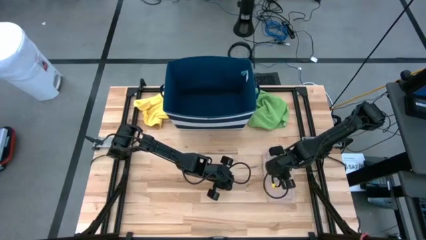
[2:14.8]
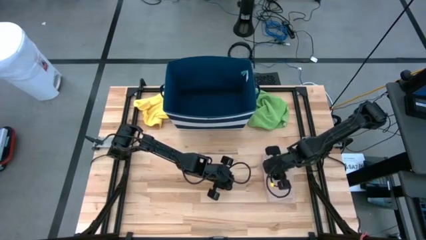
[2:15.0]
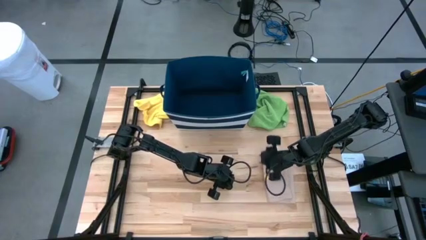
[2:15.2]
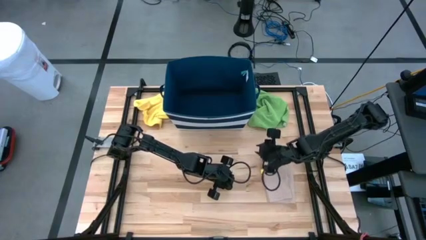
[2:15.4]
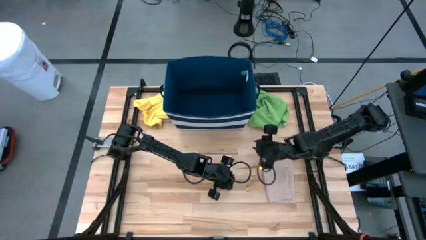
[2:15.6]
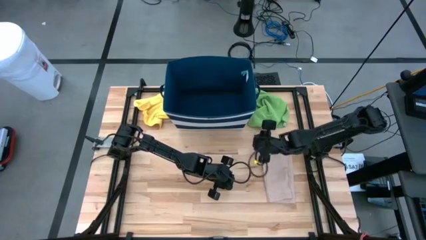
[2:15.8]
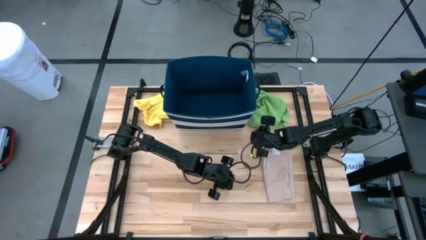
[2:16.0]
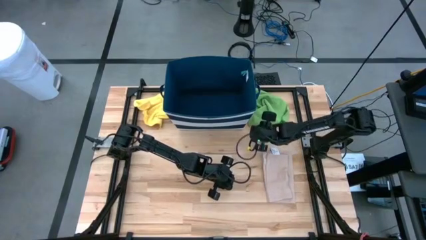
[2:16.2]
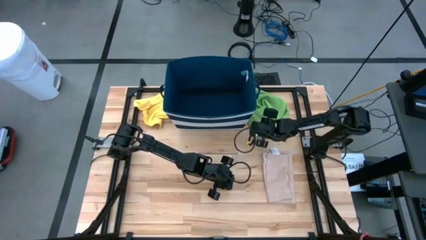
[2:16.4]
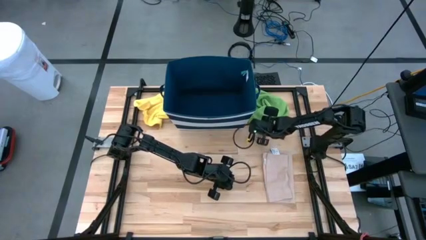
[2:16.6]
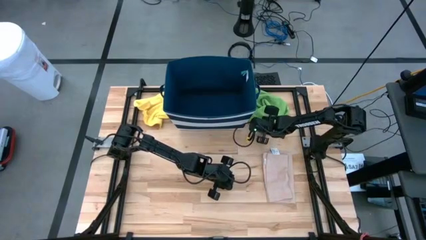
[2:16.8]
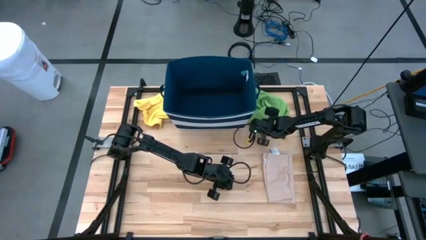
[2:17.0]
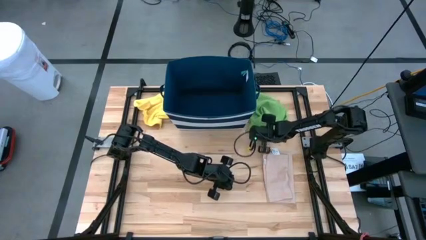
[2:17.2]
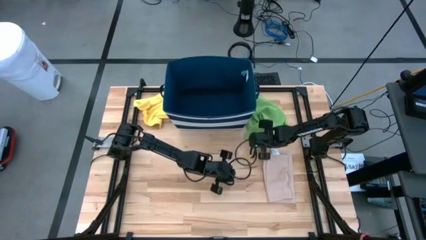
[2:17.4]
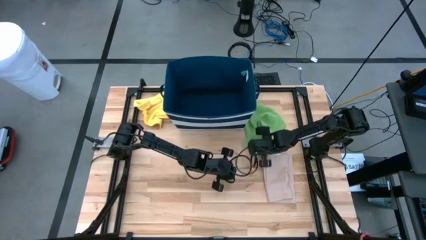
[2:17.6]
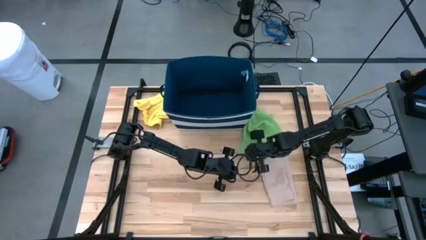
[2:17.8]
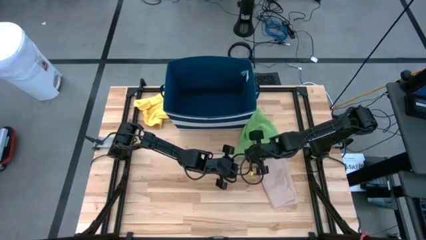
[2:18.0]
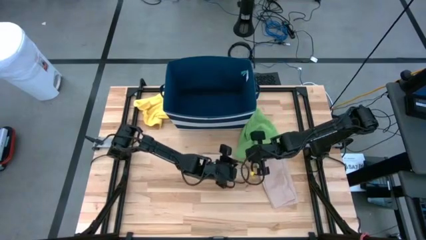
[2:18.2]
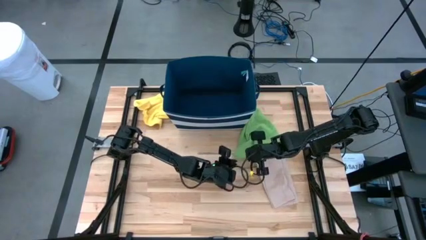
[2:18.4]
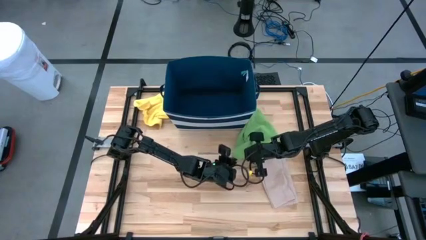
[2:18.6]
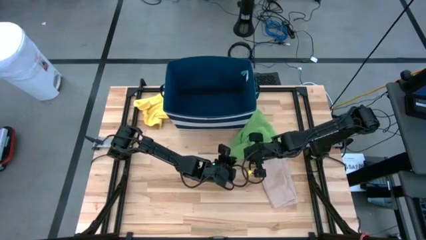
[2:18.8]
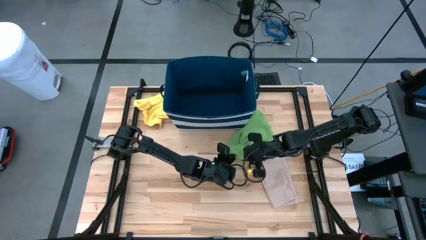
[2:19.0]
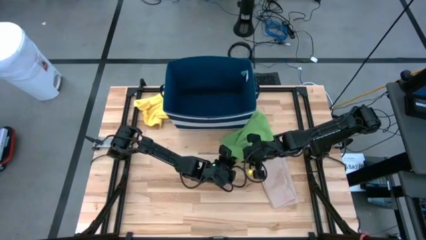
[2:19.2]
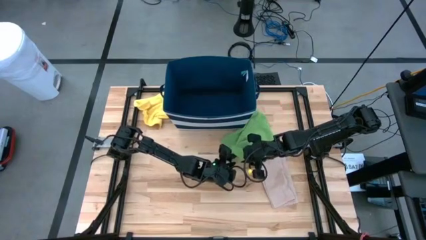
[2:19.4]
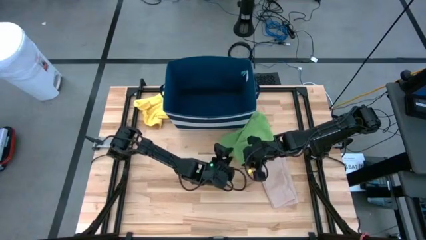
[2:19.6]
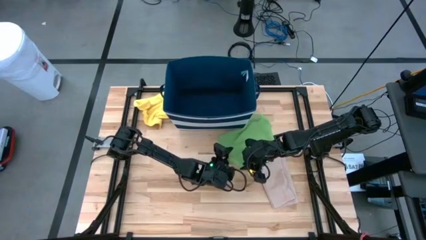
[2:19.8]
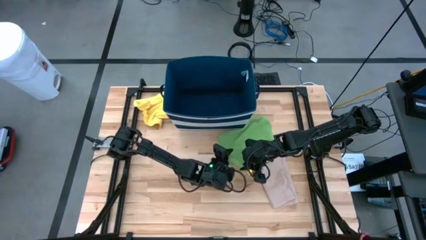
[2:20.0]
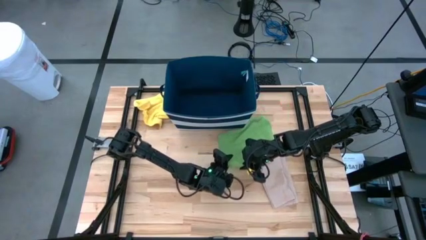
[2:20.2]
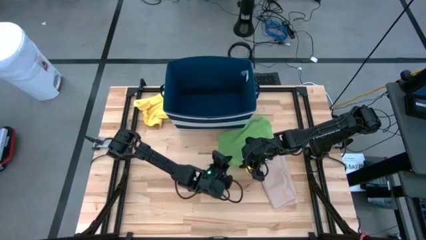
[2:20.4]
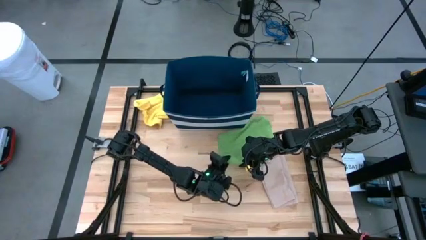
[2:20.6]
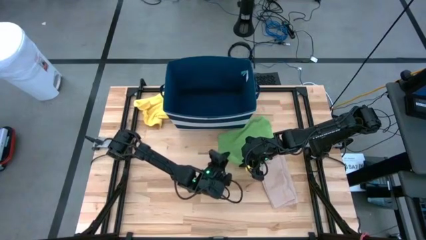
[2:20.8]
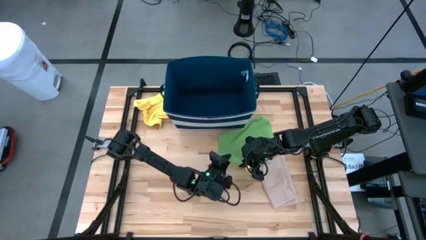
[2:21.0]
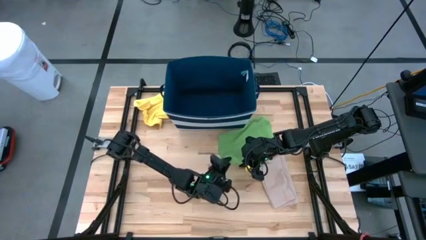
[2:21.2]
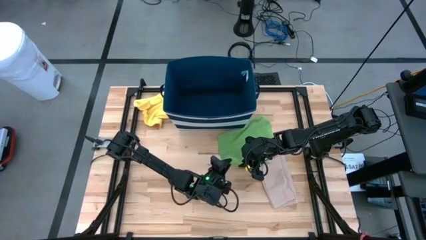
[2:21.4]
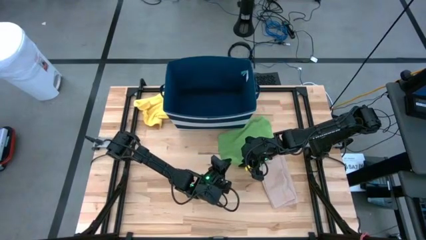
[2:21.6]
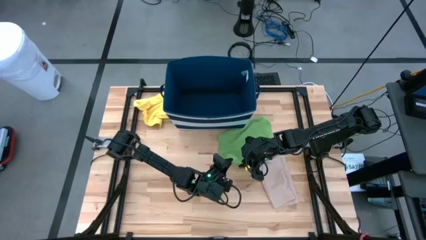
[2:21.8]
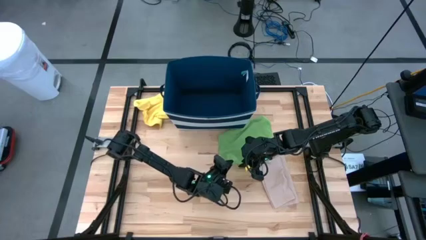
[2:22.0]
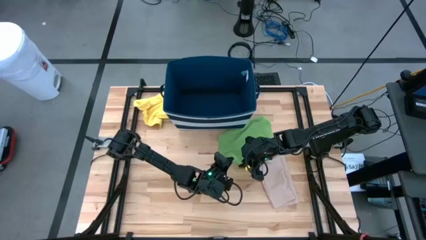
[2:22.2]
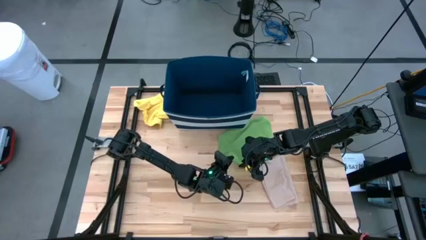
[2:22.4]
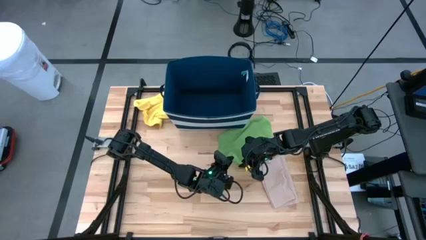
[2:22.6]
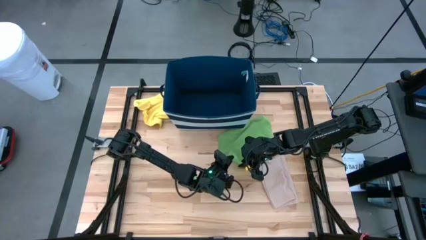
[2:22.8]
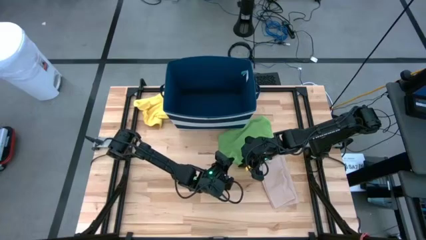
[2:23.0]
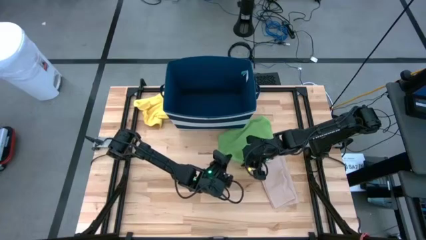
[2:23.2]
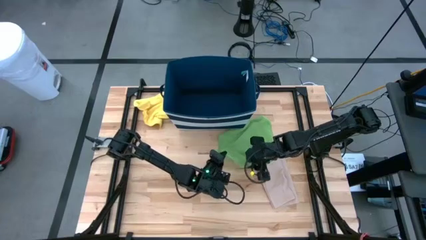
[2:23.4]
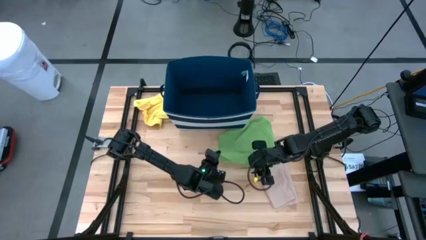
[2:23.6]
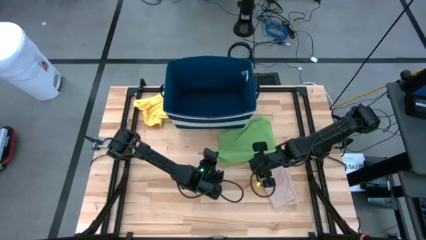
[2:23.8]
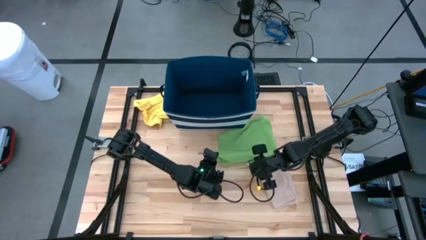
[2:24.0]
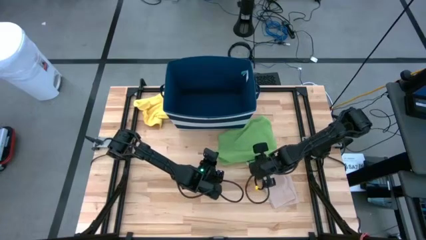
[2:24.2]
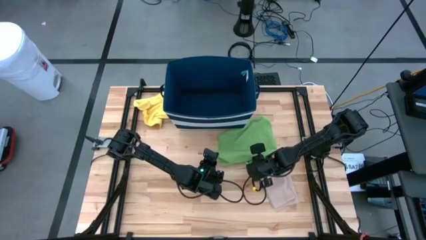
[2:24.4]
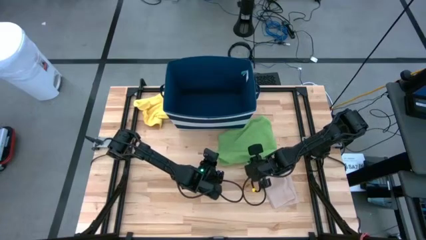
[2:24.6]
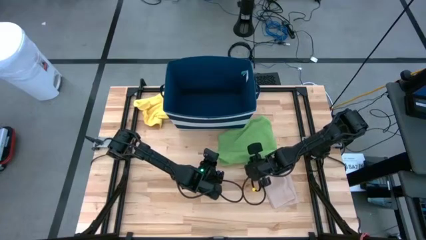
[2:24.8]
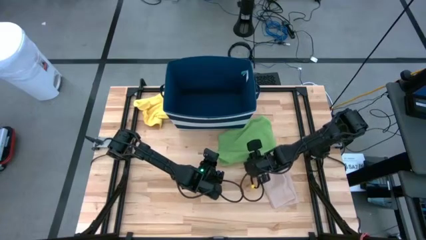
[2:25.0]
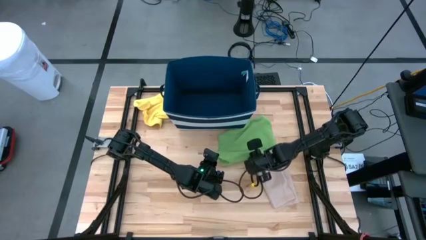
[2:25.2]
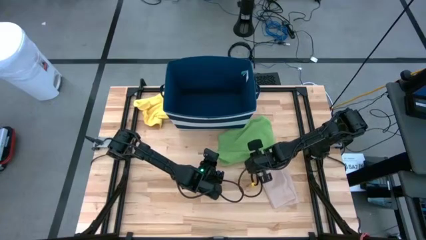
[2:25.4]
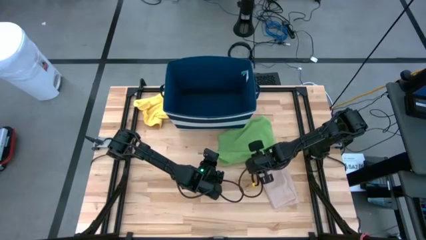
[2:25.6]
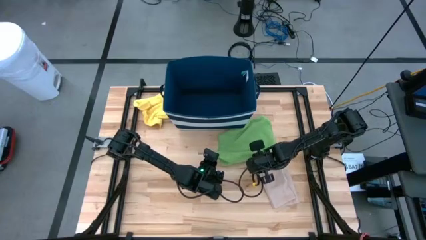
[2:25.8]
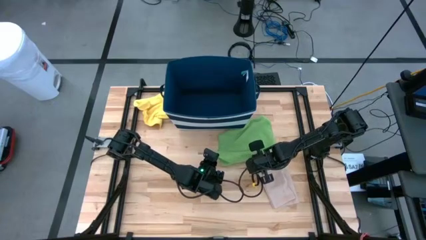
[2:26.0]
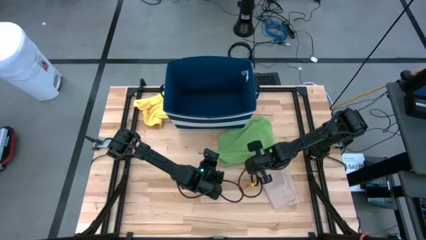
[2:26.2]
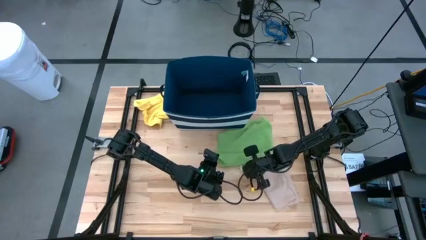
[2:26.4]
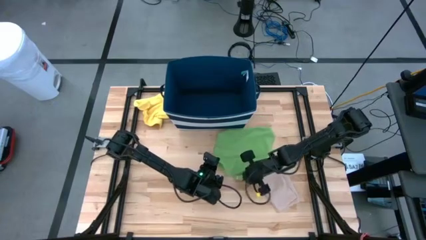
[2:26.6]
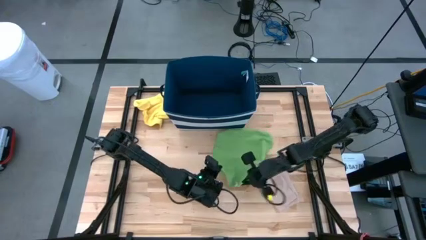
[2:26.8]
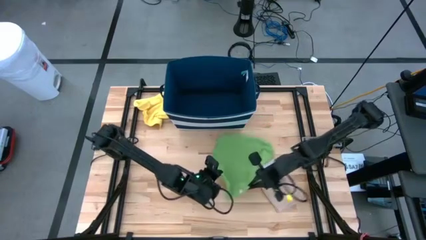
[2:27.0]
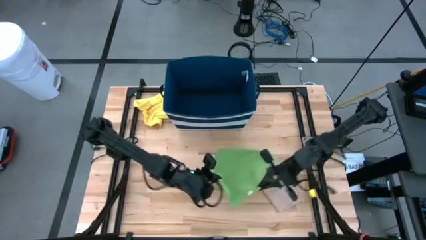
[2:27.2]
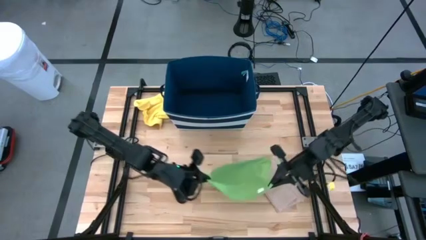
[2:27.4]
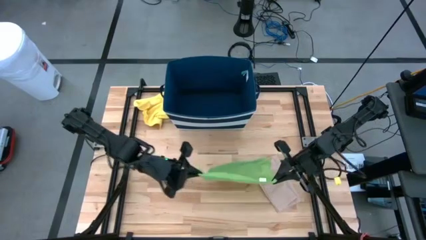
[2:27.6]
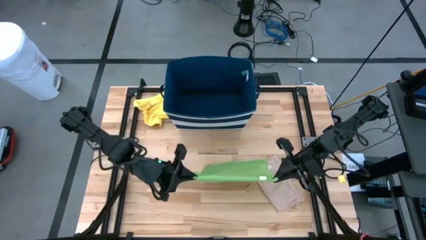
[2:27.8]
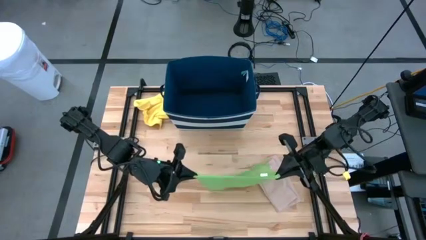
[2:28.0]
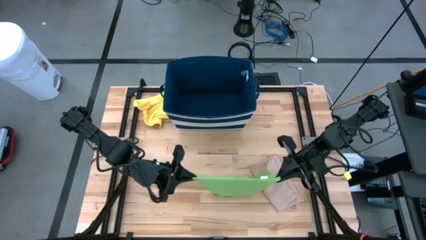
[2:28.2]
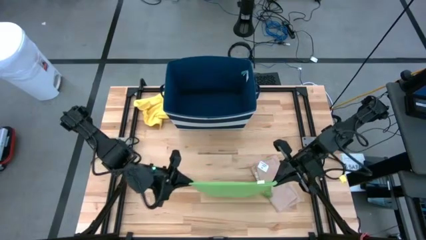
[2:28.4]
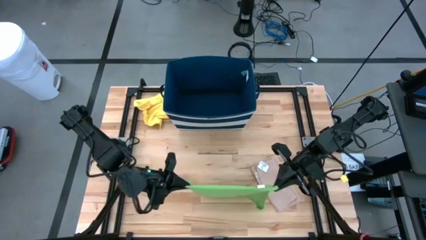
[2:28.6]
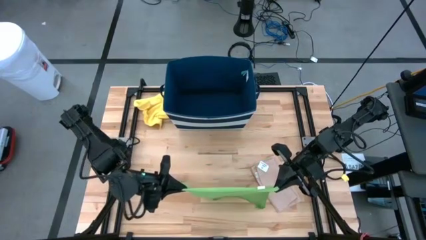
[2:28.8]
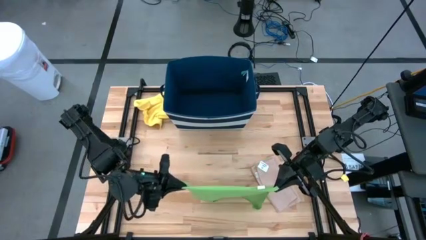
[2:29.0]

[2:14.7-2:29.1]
Task: Fold towel
Fold the green towel
